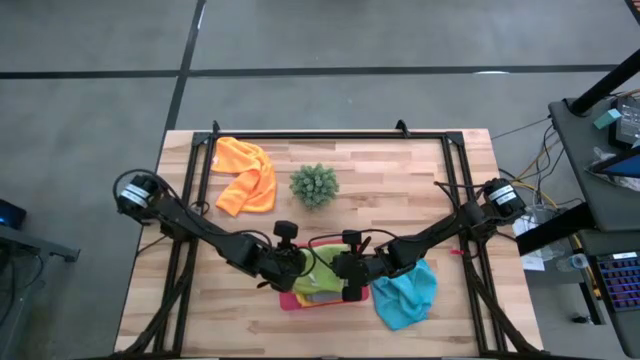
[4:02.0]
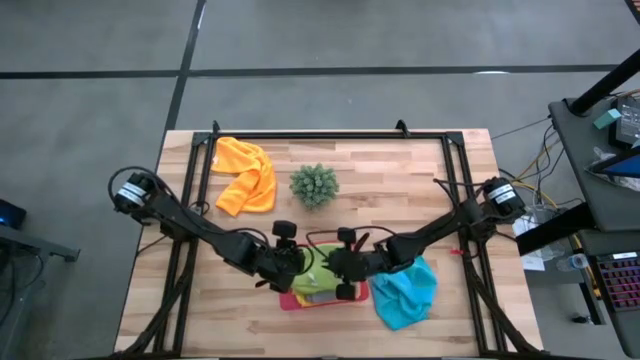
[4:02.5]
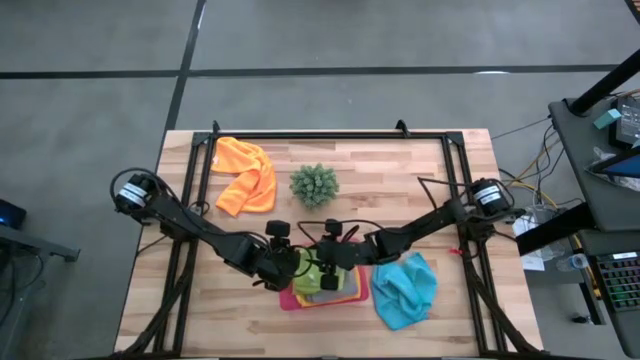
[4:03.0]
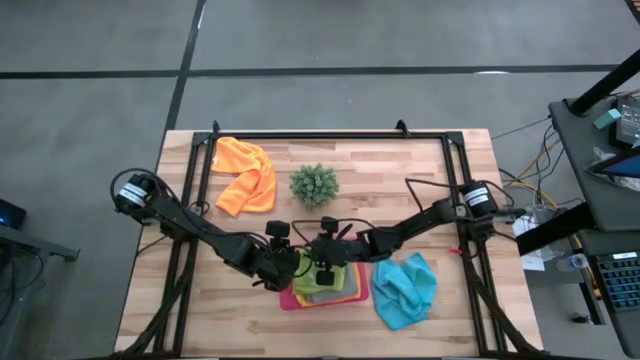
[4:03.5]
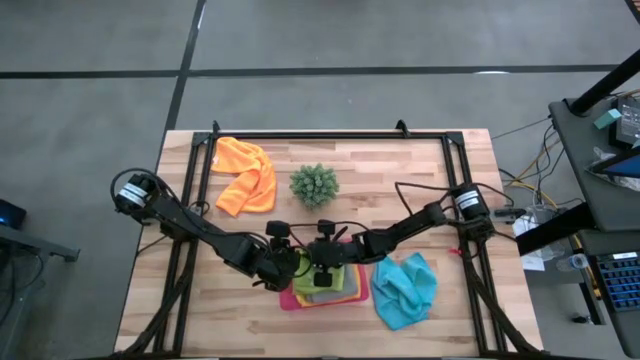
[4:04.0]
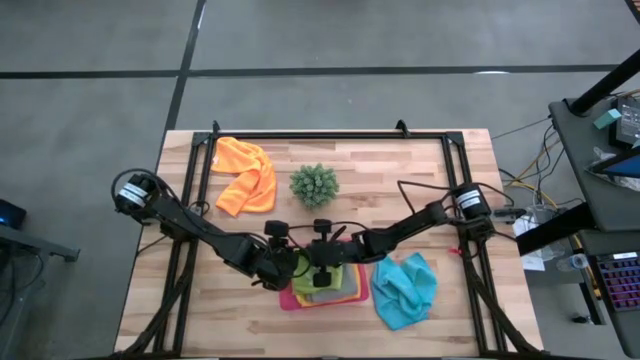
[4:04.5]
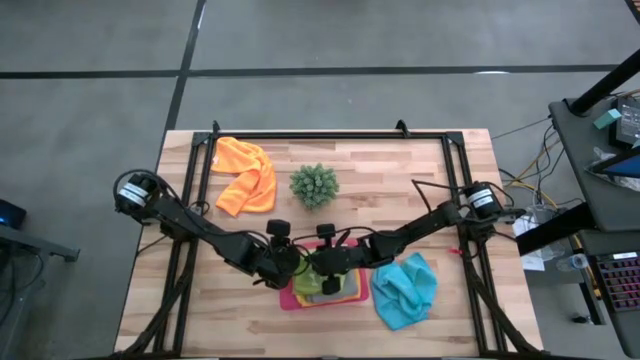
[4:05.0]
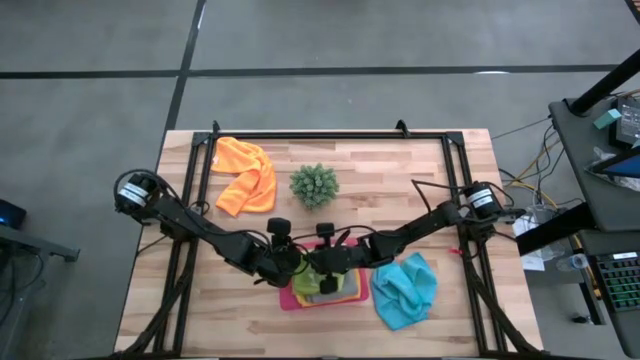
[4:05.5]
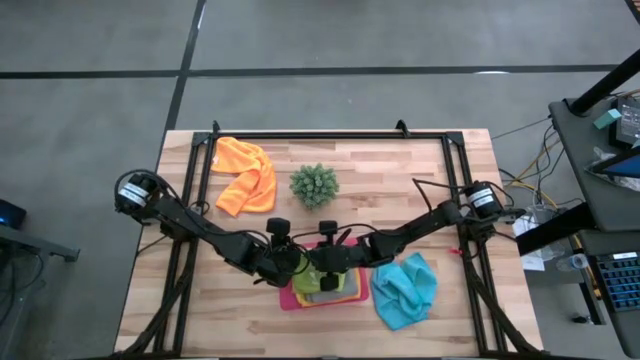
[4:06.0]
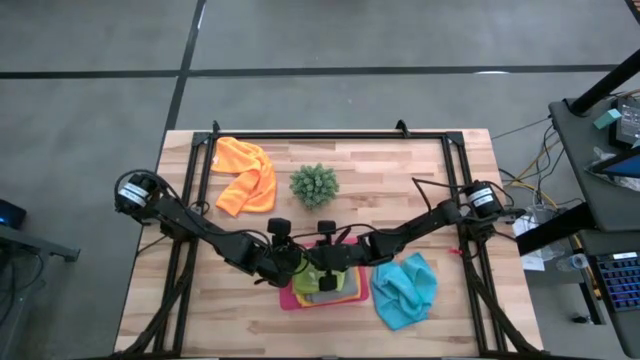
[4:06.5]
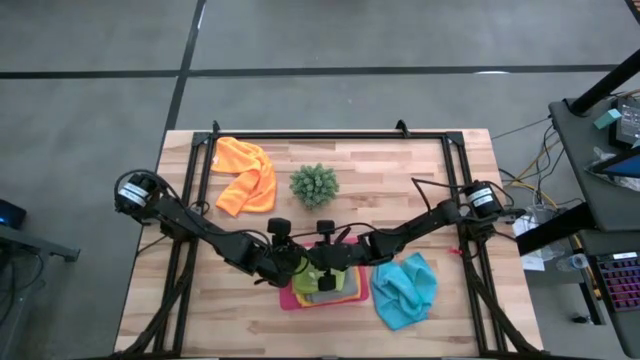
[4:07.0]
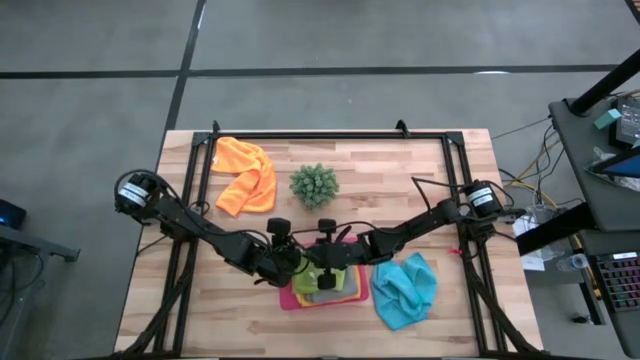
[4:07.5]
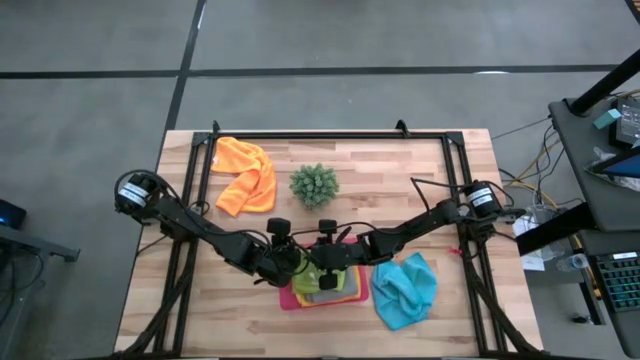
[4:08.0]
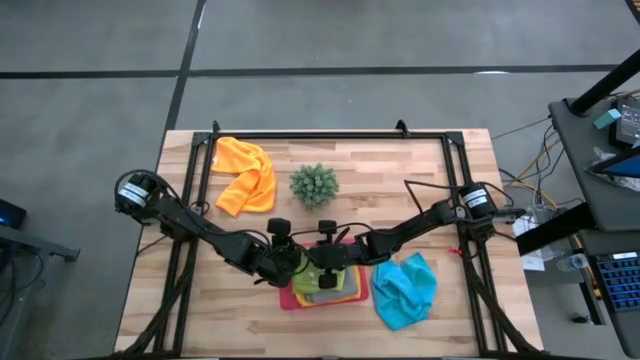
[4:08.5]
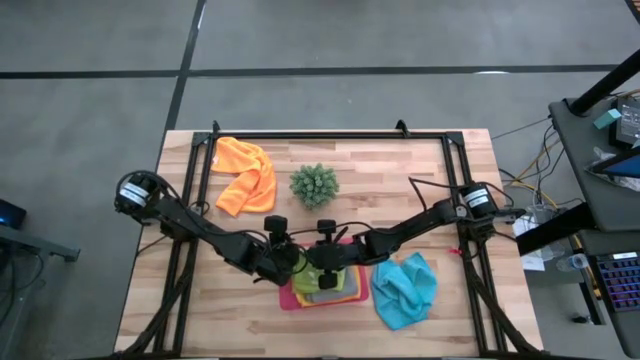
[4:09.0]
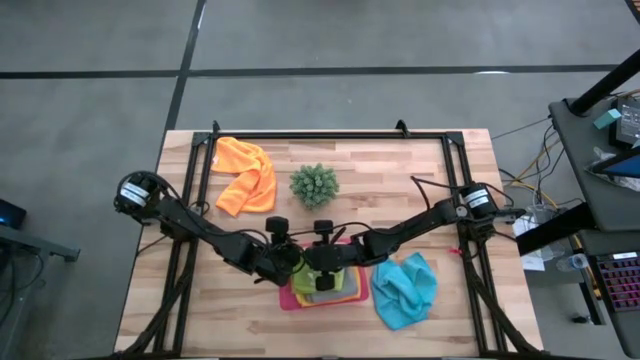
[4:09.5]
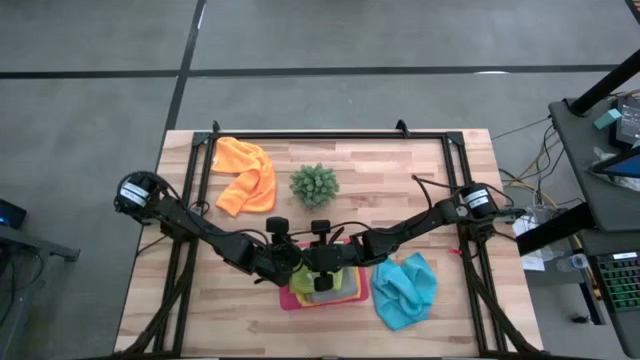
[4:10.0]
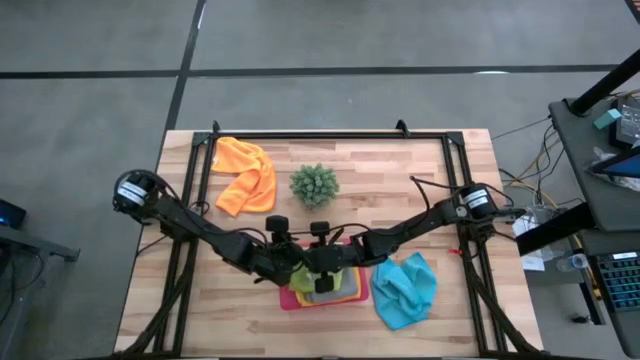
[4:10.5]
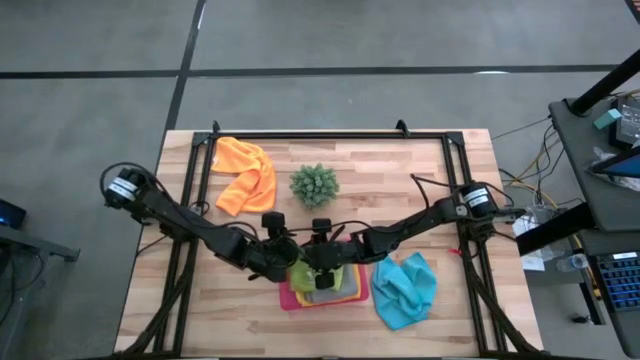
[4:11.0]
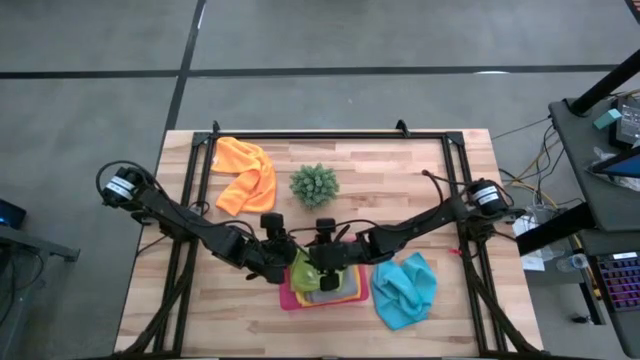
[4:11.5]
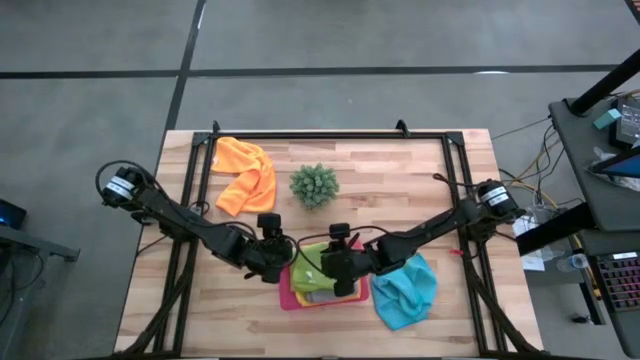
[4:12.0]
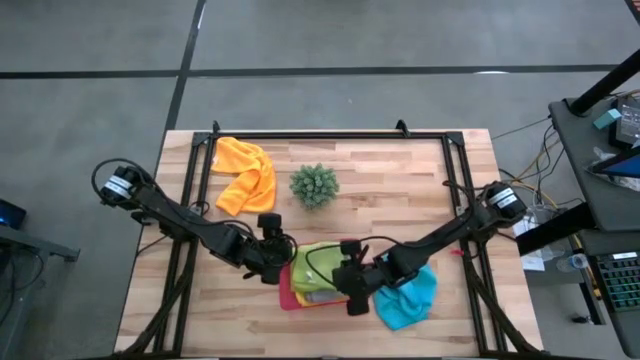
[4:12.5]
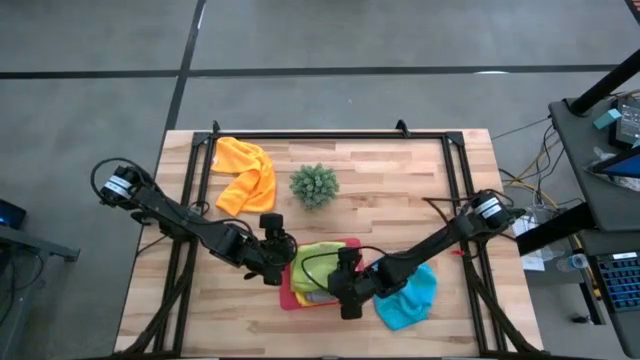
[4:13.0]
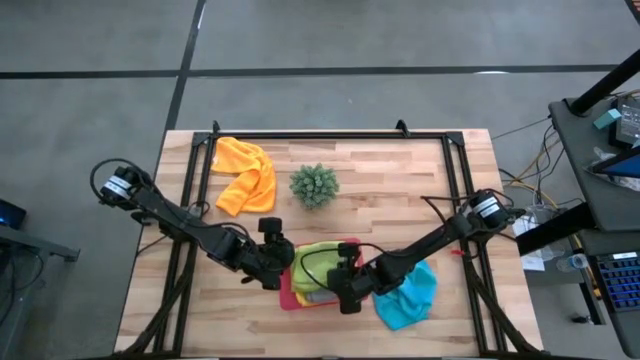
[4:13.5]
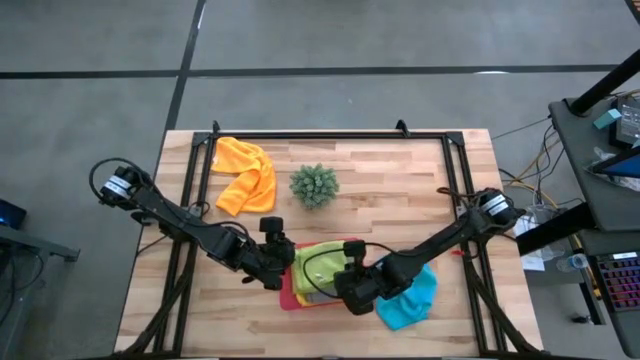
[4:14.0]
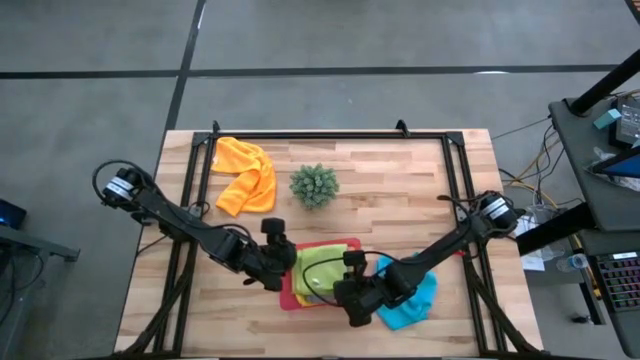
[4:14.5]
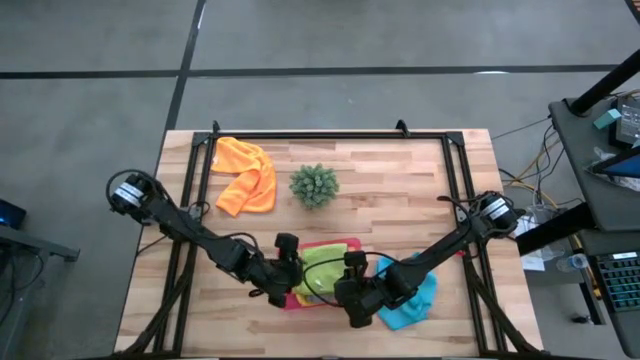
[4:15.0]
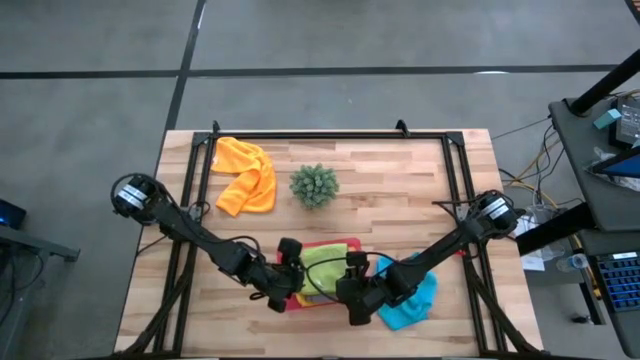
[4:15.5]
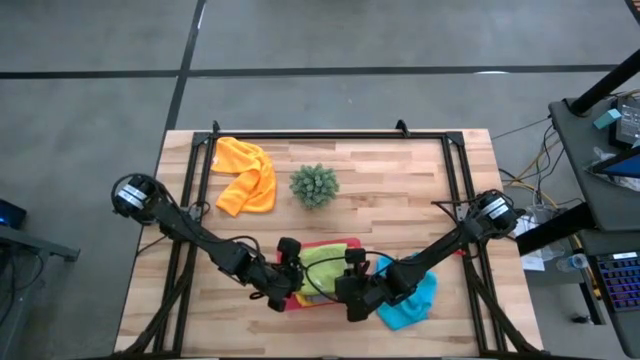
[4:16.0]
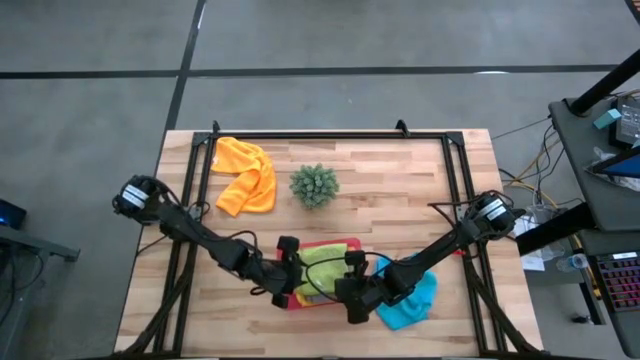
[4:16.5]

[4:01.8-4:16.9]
Task: Fold microfiber towels
Put the green microfiber cloth into the pink bin

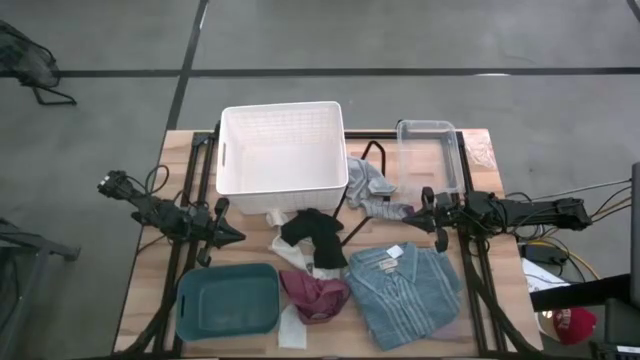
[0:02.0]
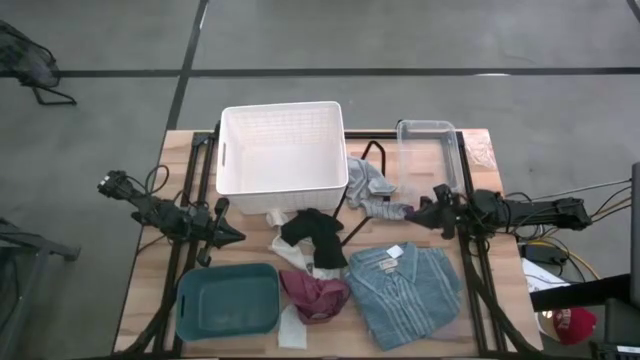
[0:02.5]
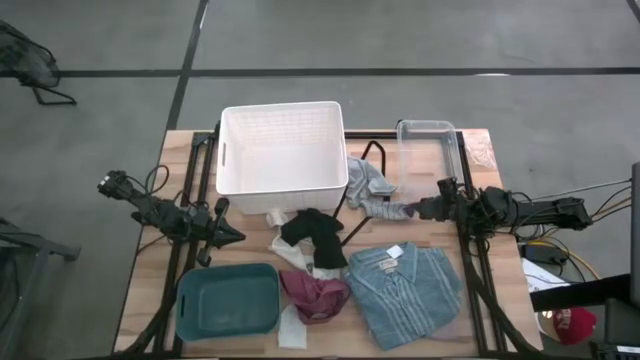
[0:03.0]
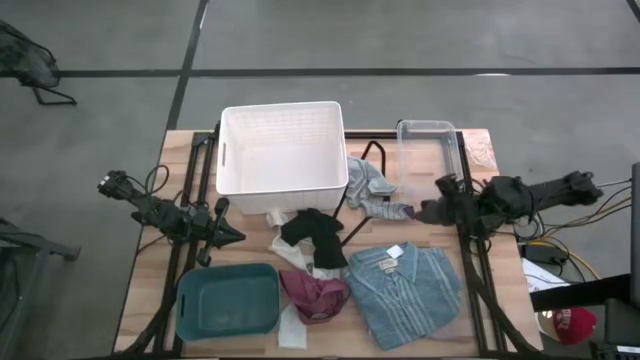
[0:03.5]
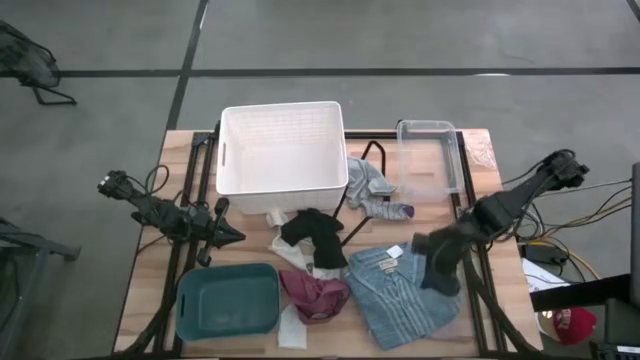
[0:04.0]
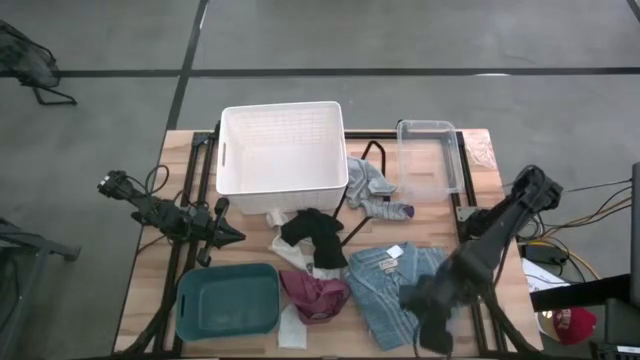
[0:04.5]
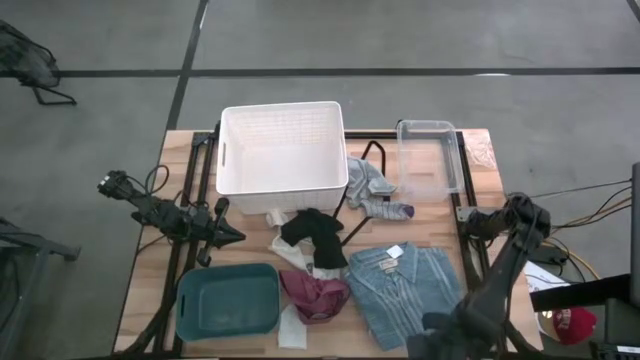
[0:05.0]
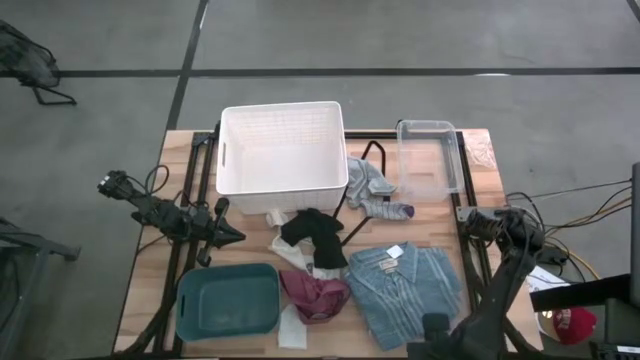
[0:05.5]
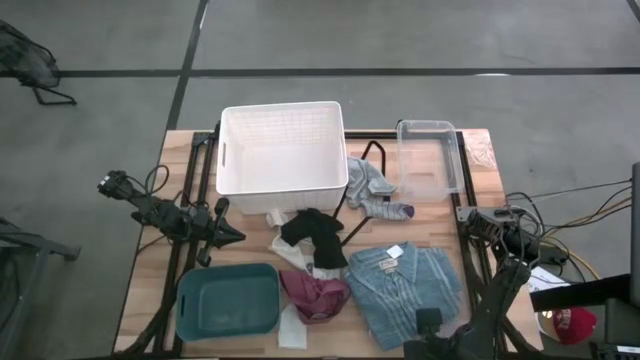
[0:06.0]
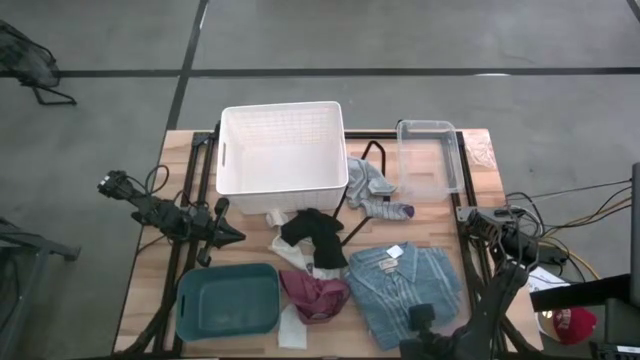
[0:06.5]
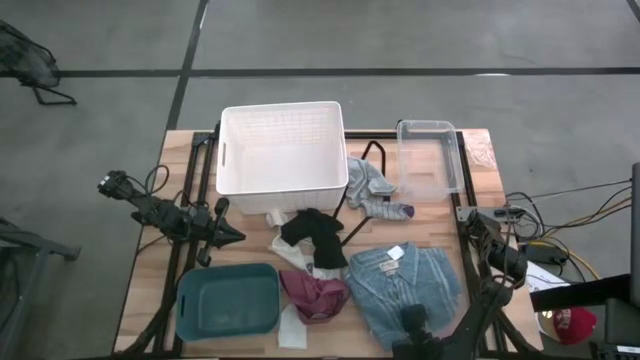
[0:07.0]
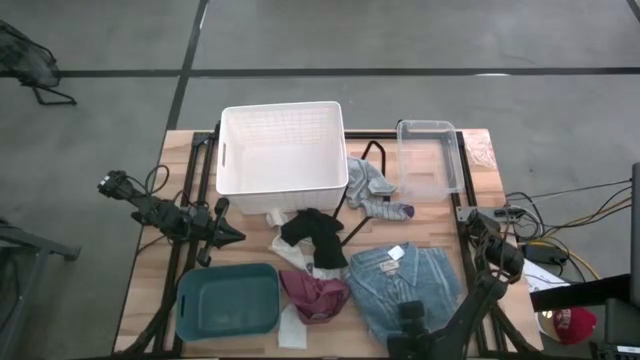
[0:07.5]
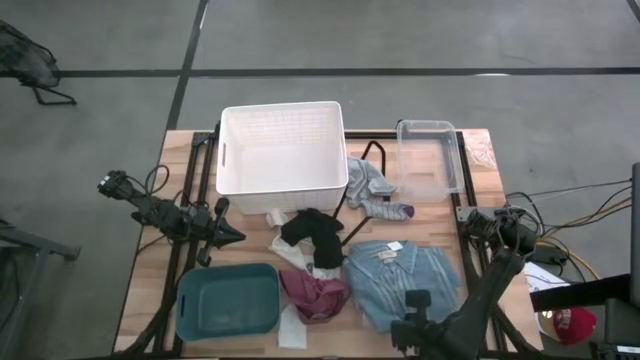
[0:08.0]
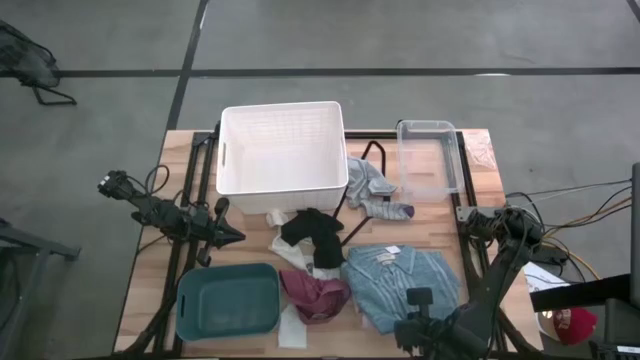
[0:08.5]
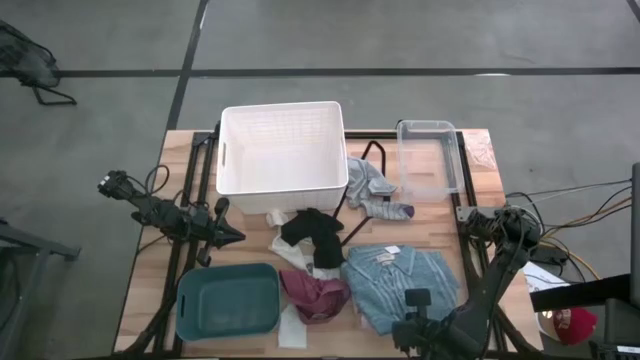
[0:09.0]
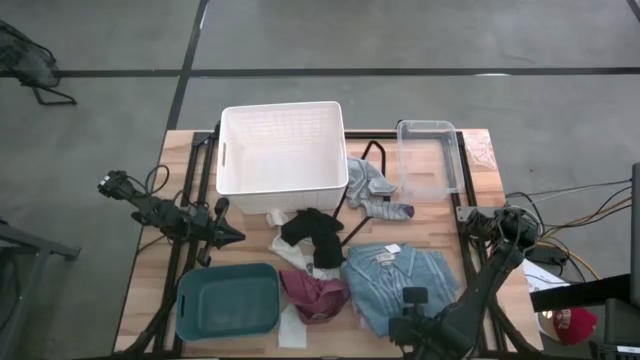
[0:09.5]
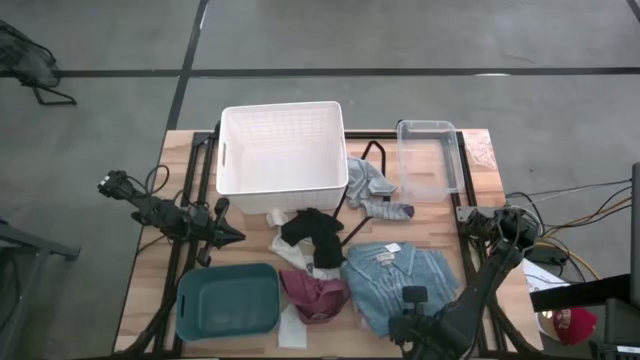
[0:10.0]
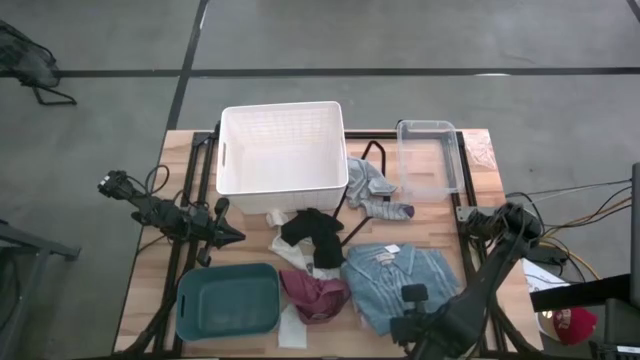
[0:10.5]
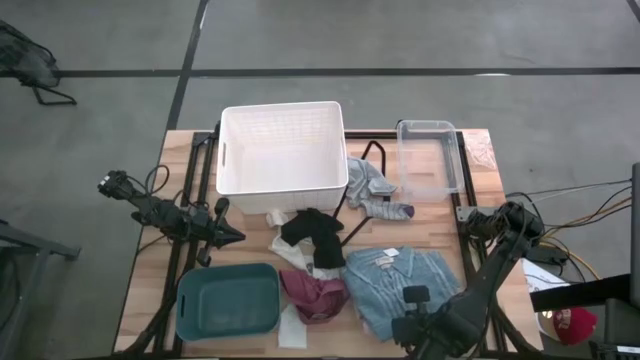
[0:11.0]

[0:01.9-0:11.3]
Task: Pick & Place Cloths
Put the blue polo shirt into the white bin
